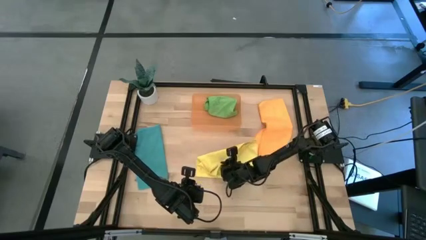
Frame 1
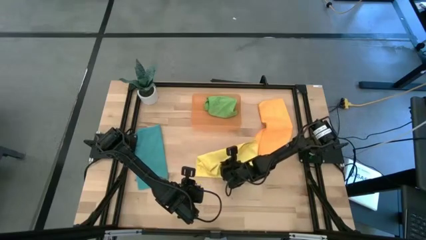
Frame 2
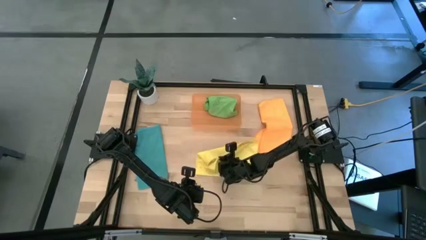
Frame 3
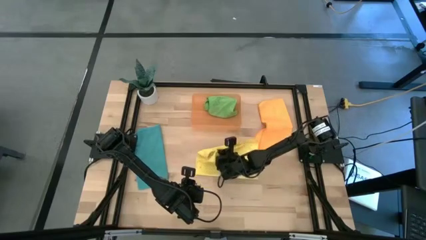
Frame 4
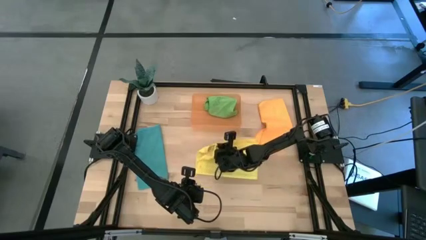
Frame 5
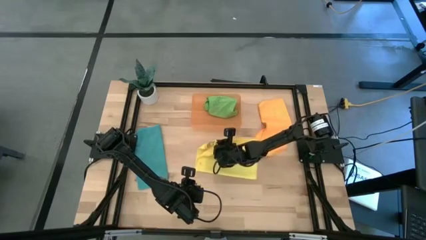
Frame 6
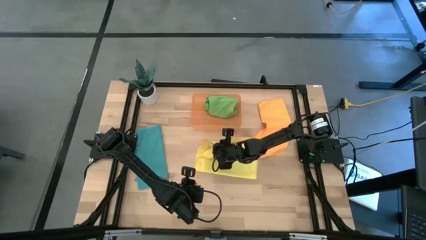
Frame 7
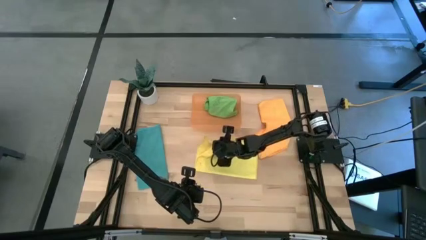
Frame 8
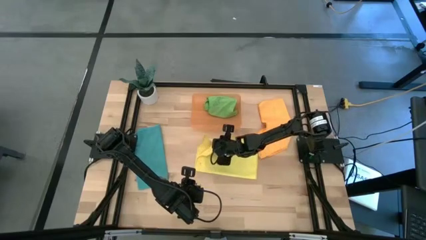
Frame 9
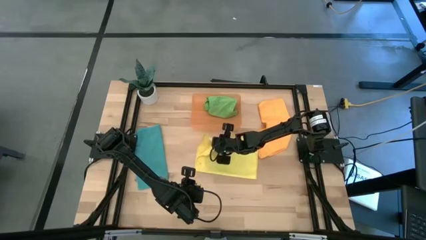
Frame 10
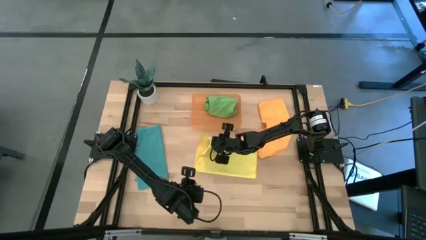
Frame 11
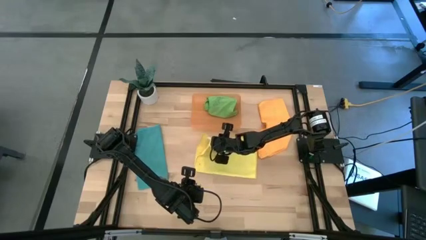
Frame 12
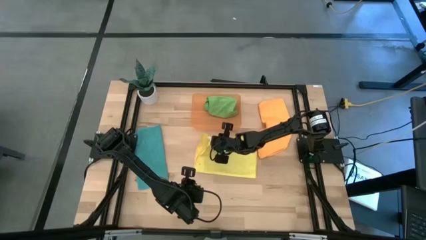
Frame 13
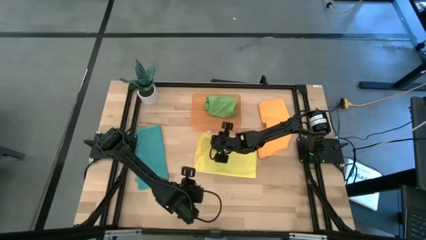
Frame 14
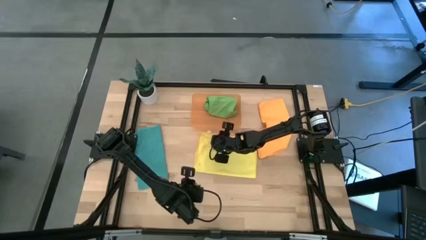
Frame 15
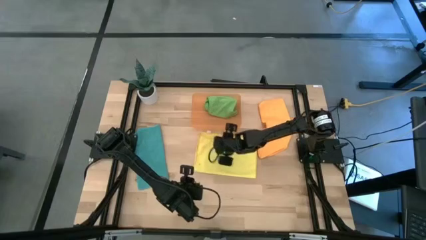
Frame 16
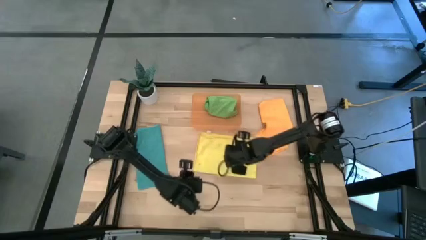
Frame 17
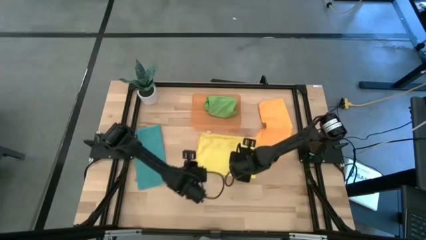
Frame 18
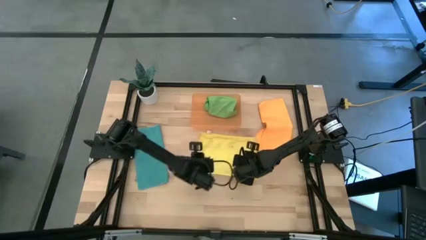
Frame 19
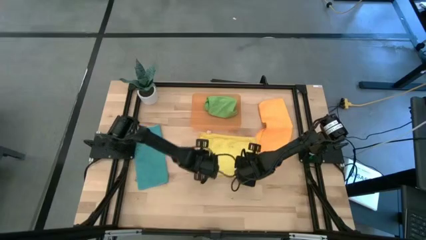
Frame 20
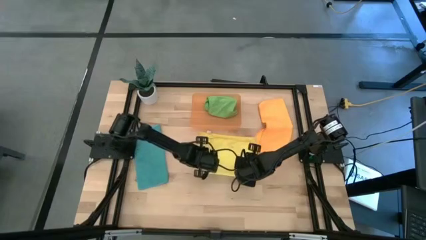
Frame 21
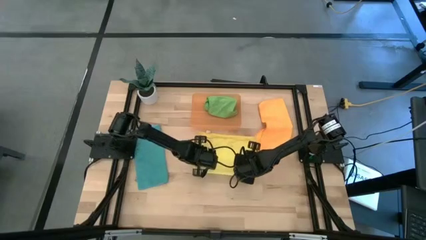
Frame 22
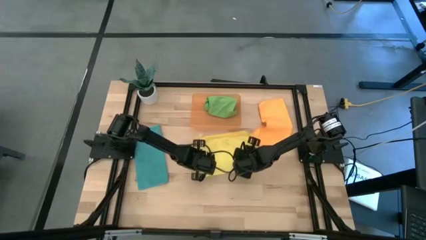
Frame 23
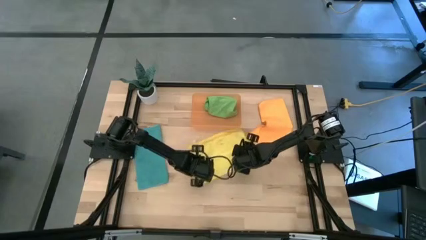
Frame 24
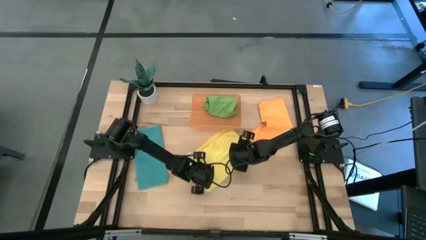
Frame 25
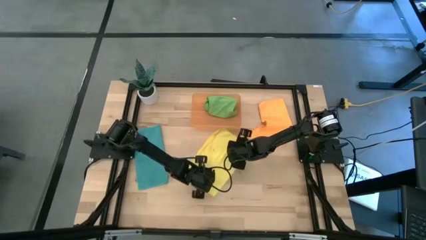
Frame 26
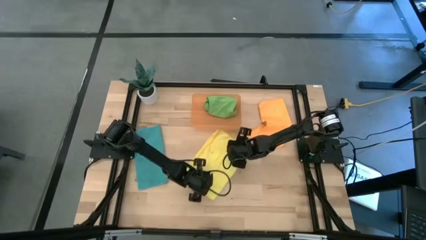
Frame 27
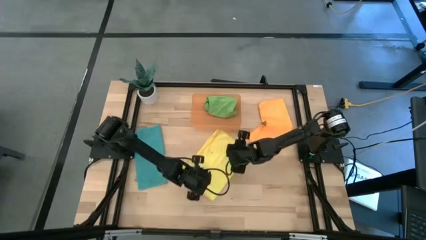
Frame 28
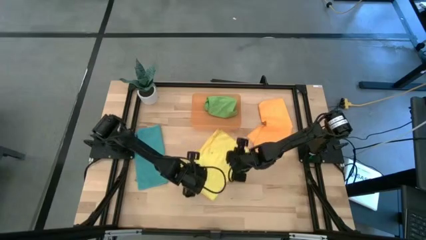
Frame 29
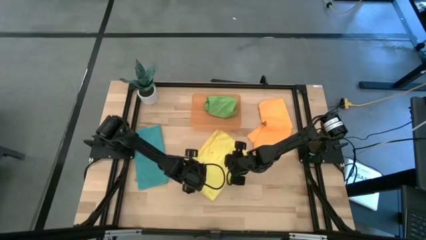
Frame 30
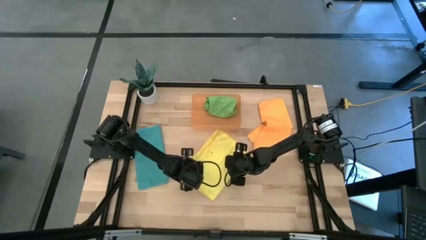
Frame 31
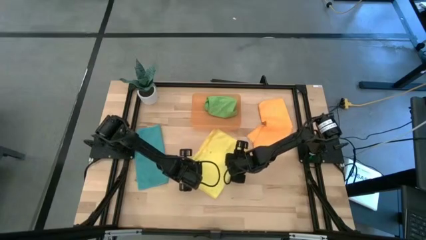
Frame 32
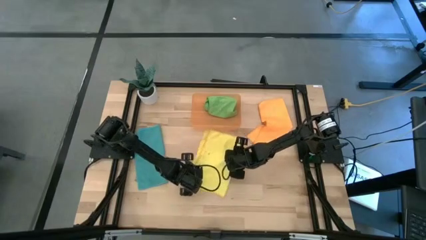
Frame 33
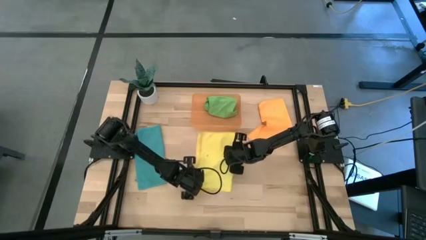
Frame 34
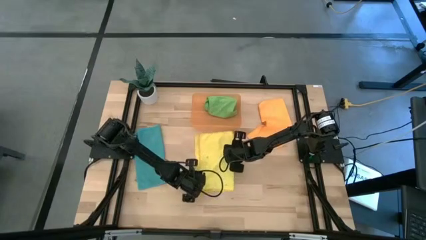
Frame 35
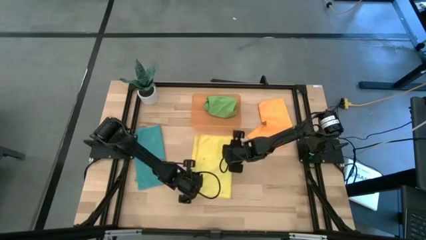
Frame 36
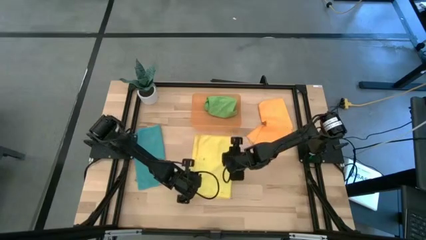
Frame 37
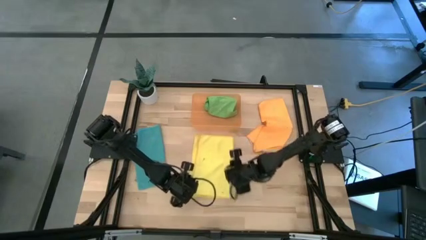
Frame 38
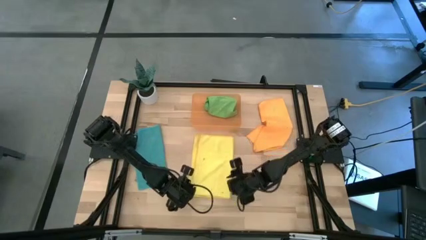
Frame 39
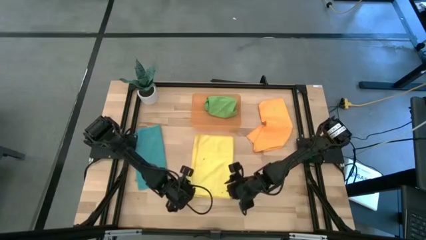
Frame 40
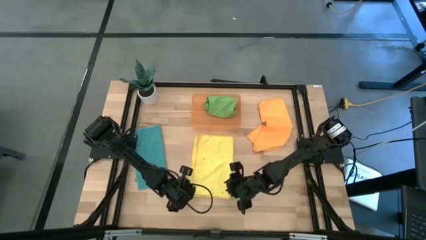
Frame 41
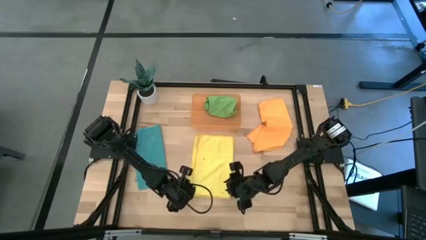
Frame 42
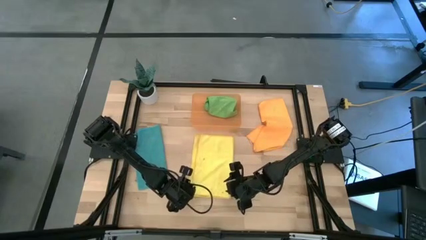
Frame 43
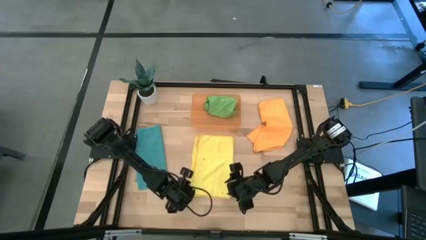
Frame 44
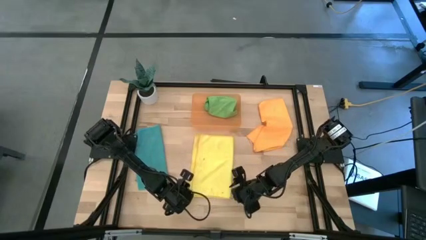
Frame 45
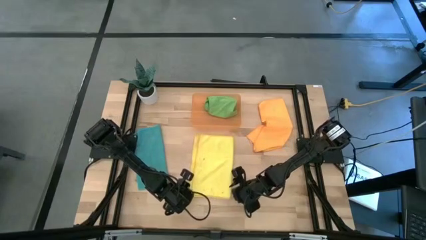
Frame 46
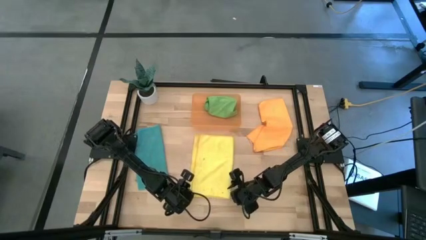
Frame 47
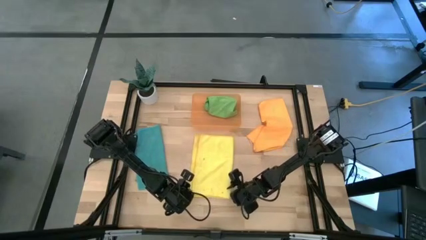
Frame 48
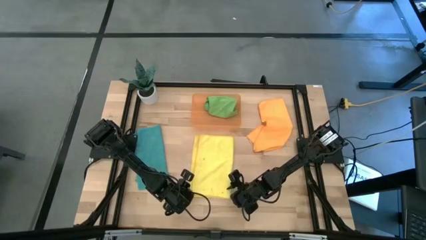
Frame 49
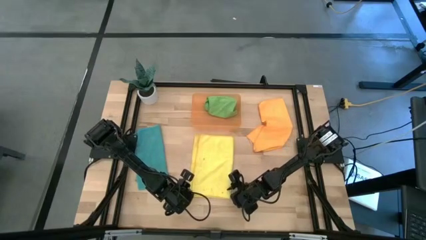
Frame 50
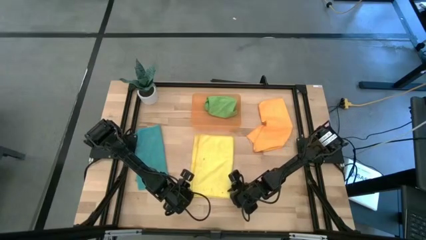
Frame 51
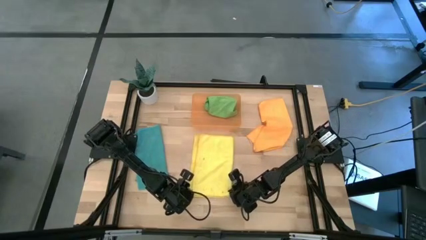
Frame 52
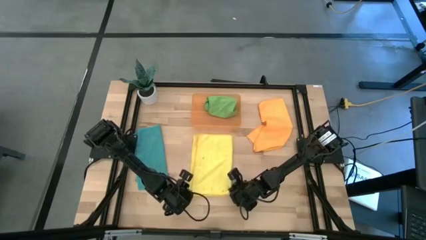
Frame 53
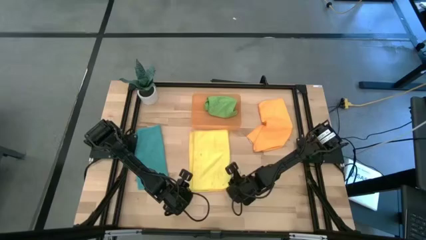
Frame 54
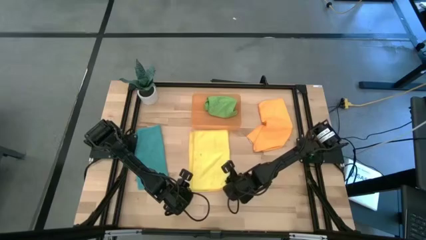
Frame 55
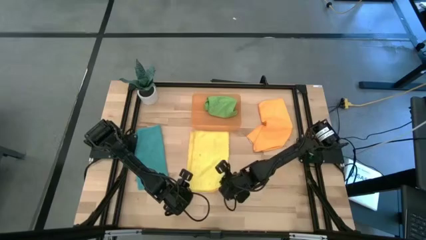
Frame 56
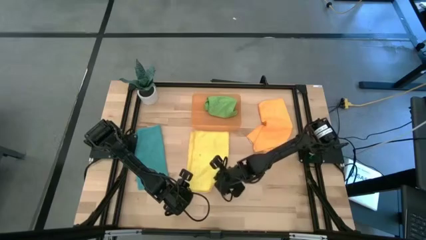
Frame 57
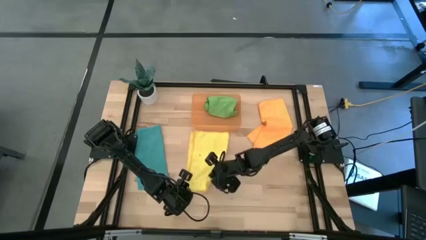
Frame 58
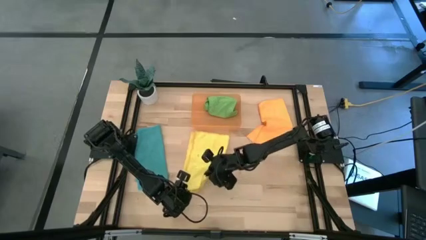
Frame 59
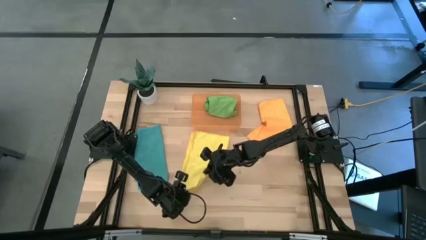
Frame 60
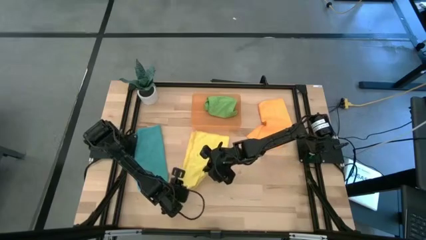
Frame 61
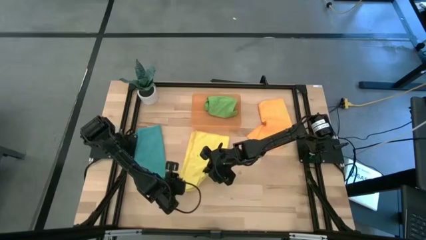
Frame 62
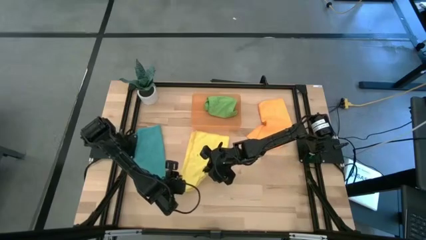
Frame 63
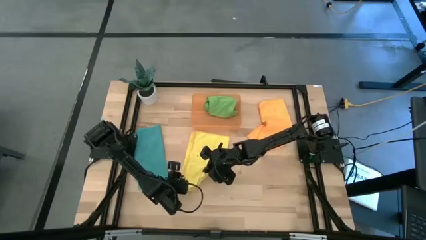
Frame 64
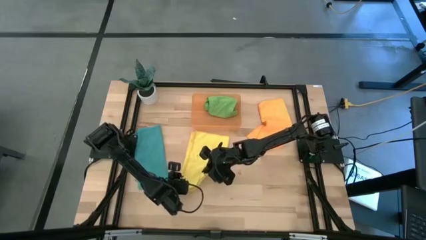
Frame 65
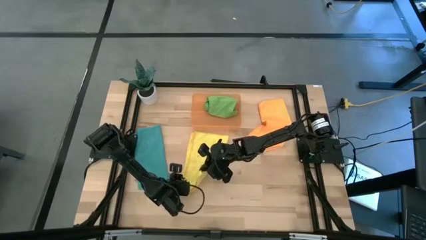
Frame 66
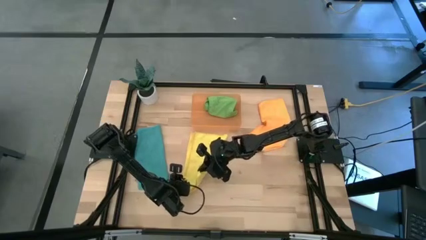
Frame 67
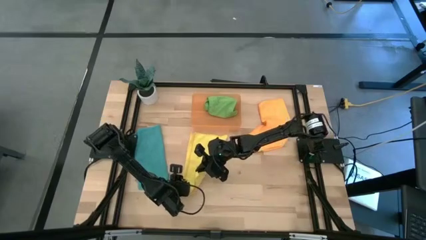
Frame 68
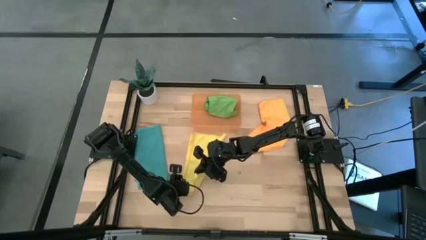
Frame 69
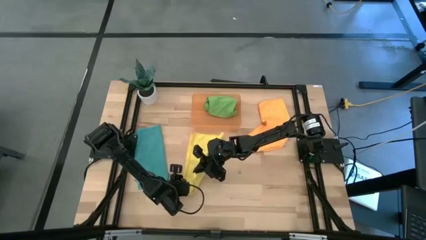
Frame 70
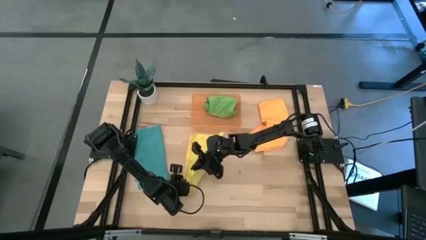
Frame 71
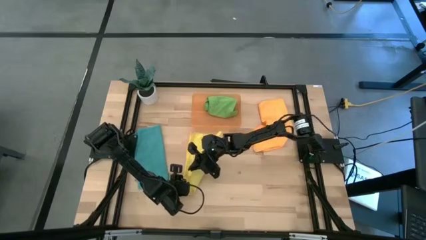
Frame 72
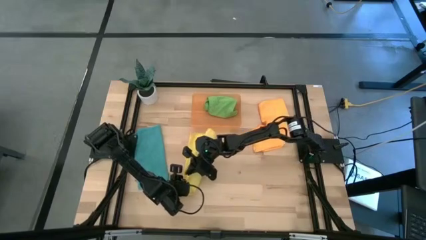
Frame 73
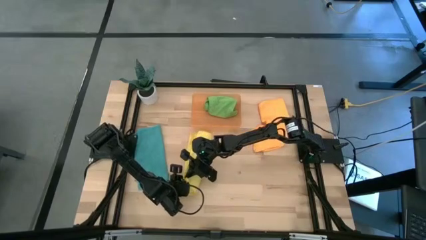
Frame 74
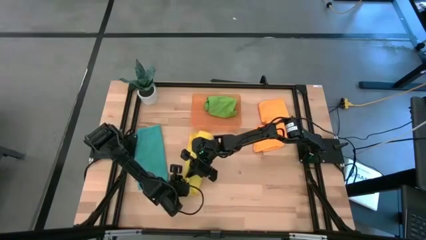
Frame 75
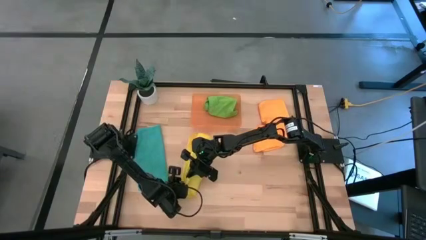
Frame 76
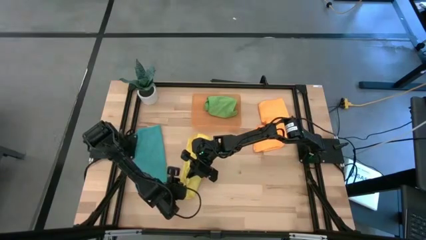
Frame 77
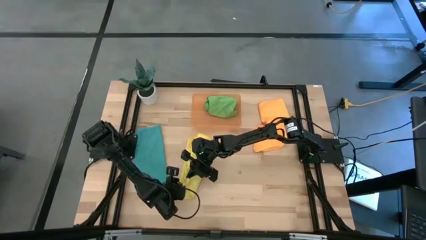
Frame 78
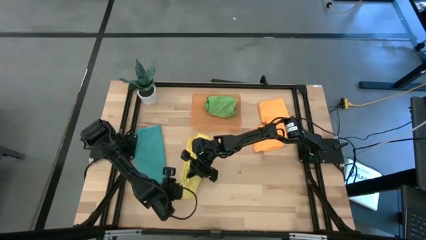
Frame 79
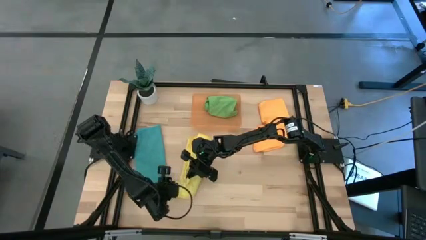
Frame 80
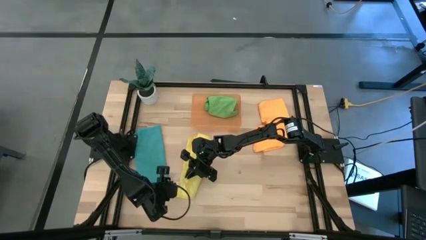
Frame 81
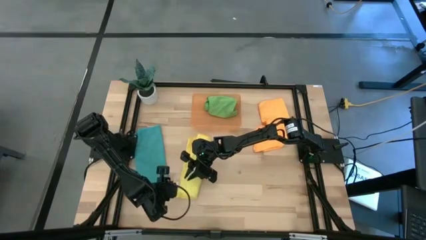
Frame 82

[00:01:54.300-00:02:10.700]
Task: Roll microfiber towels into tight, uniform cylinder then place into a basket
Fold the yellow microfiber cloth
